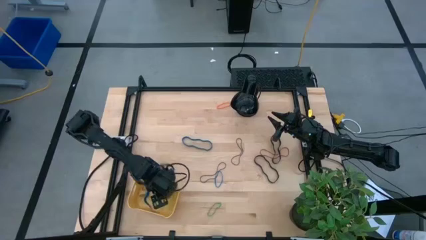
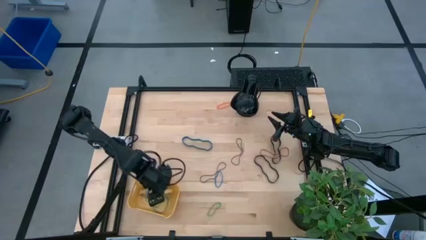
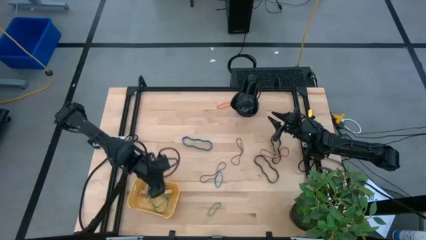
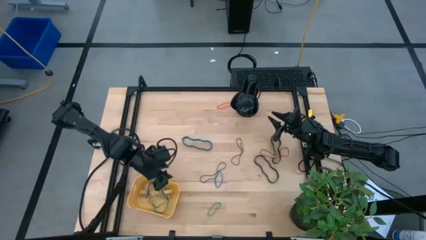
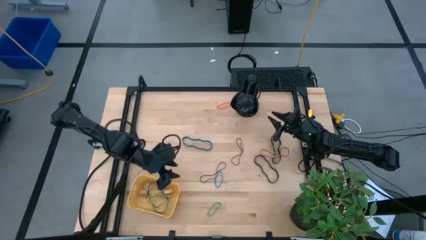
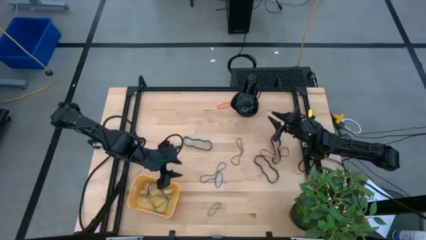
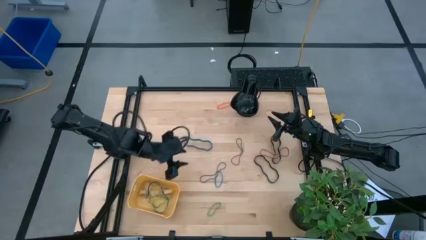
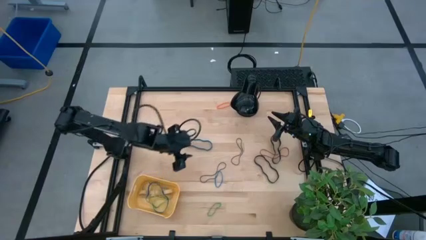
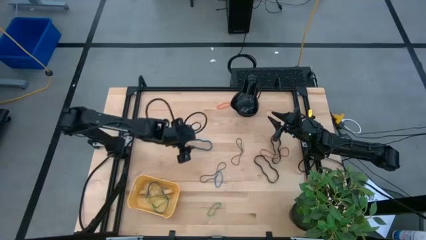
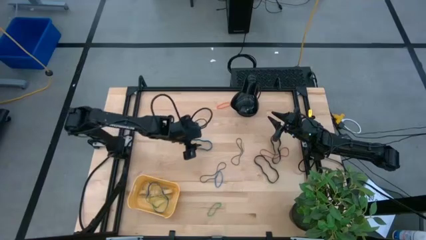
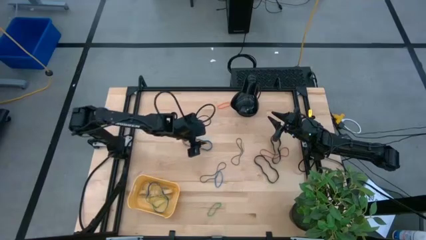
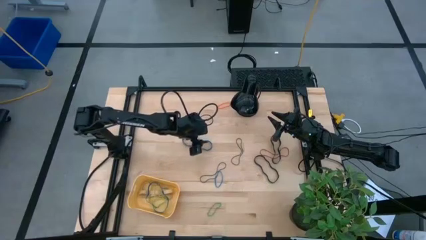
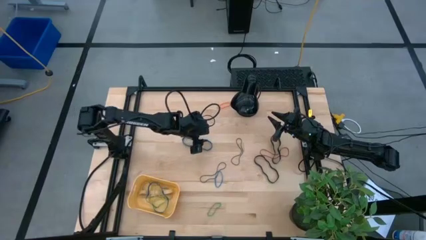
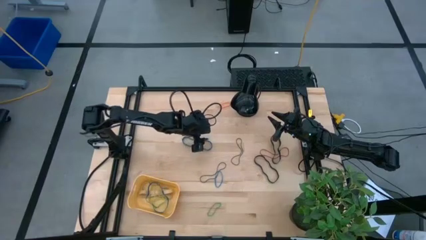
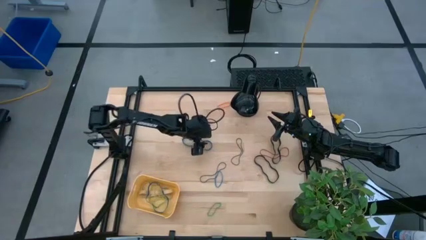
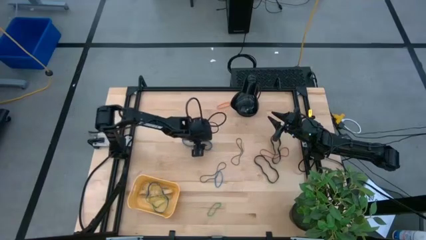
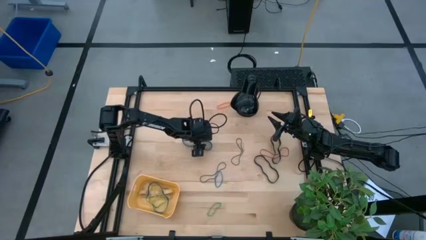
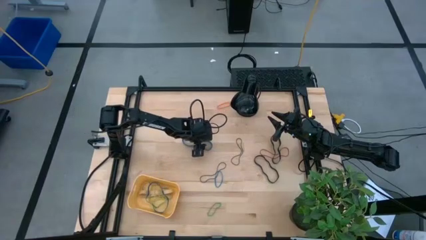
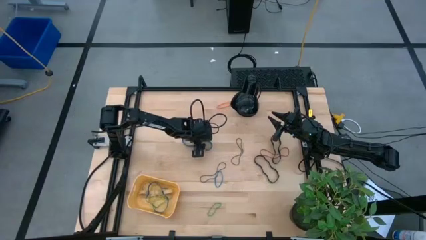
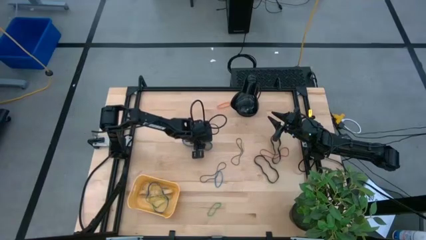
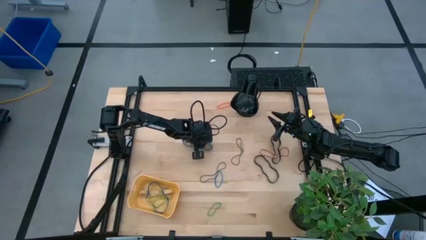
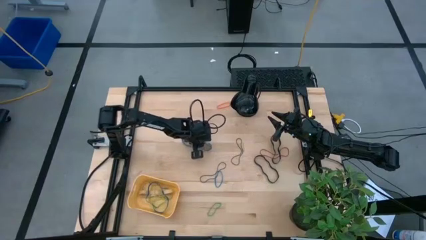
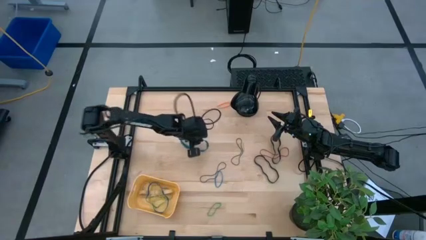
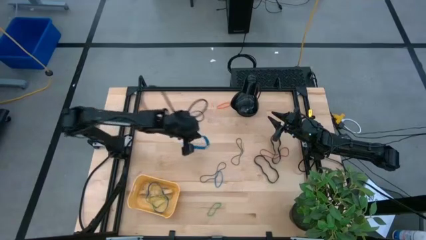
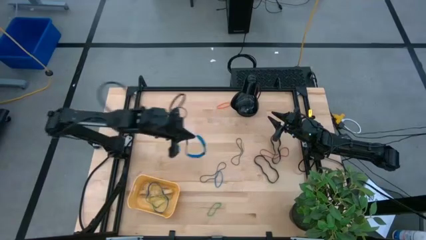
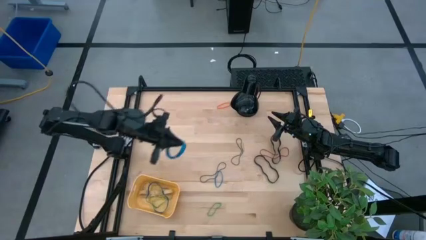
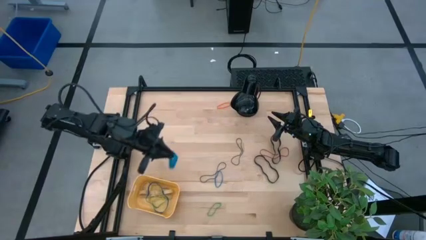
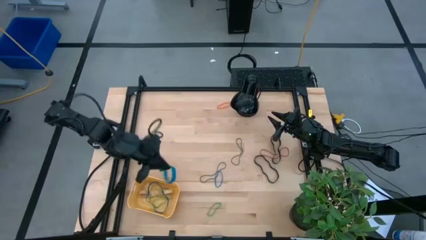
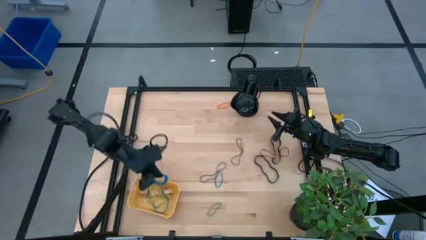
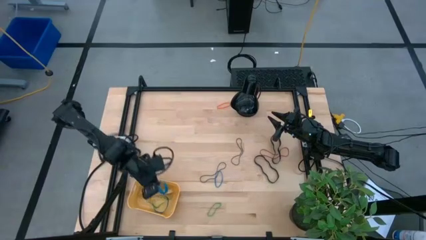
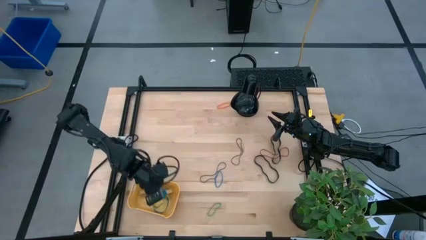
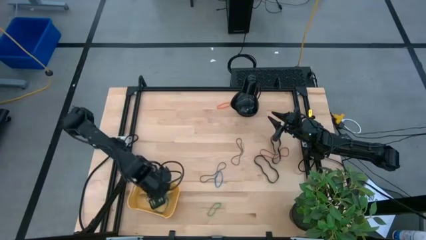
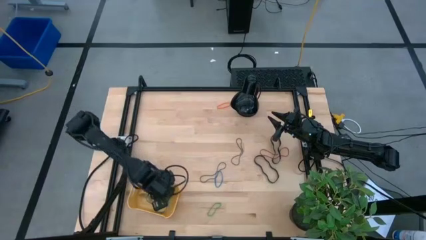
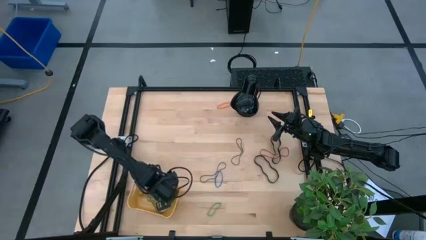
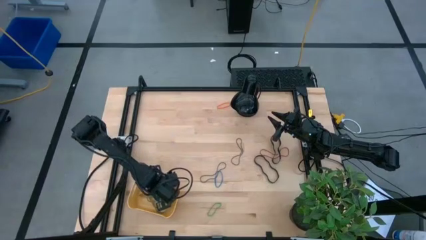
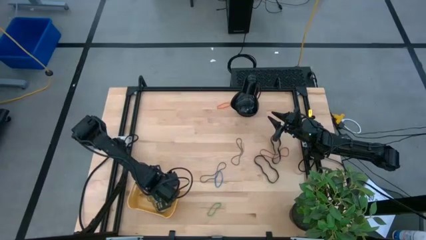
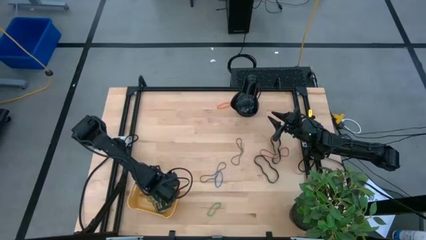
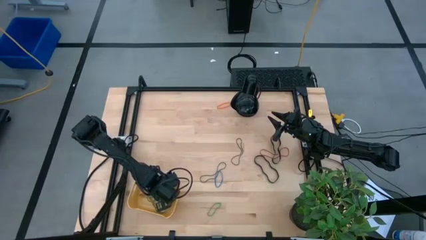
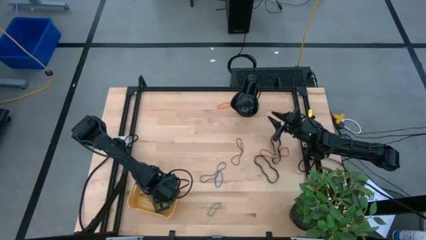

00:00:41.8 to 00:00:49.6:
Task: Pick and place rubber bands into bin
Put the blue rubberband into the yellow bin

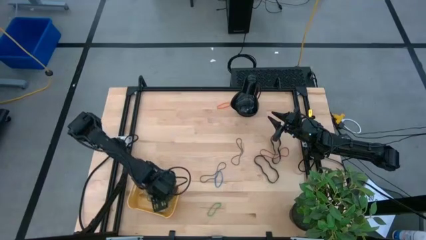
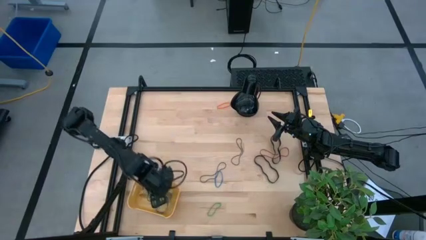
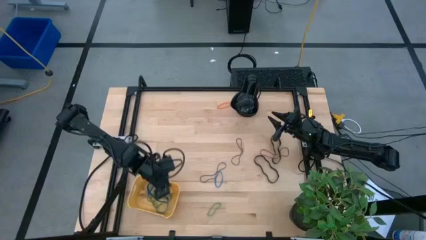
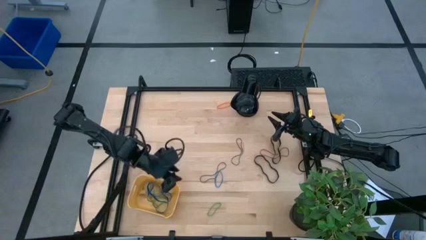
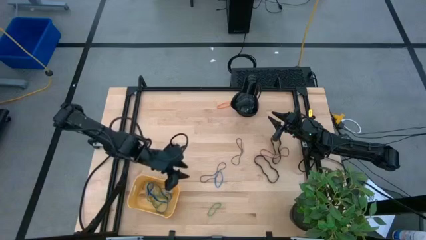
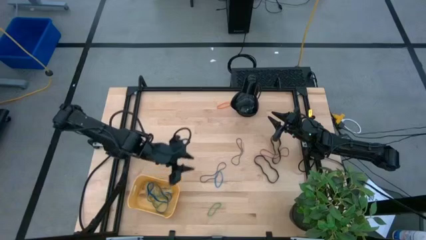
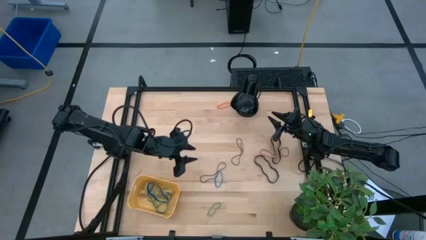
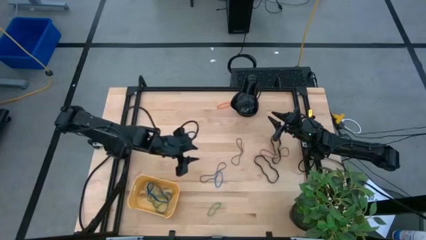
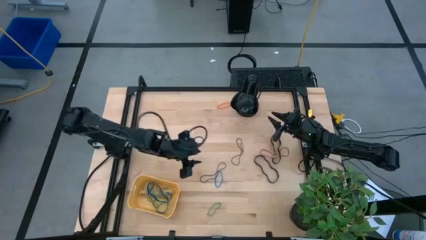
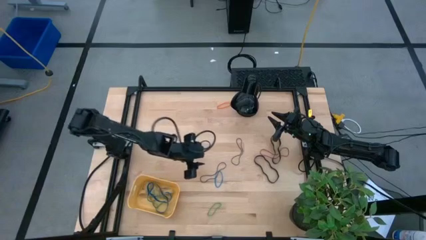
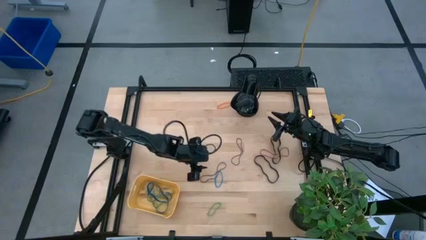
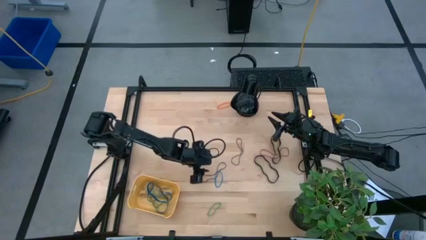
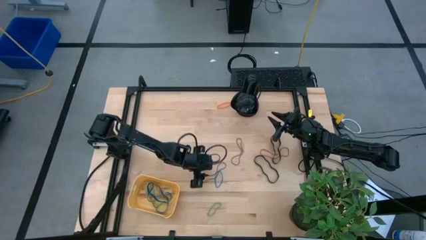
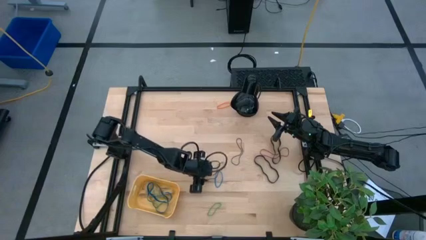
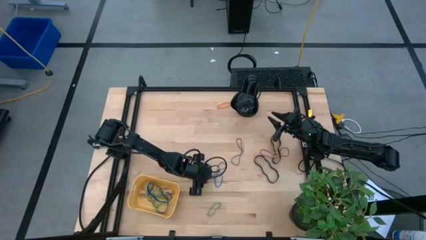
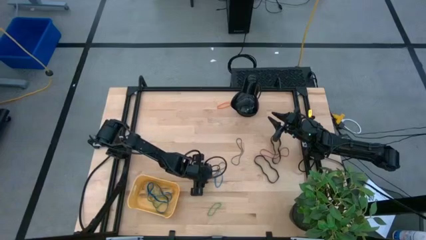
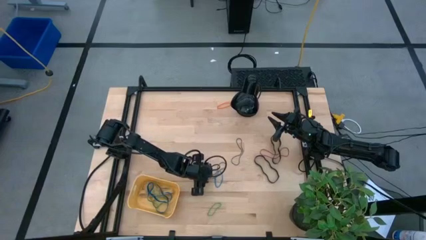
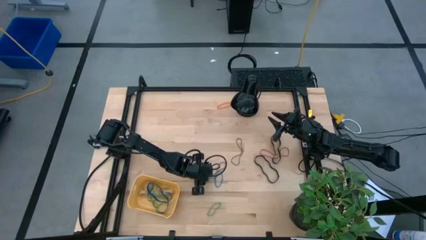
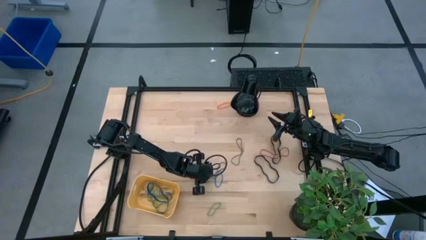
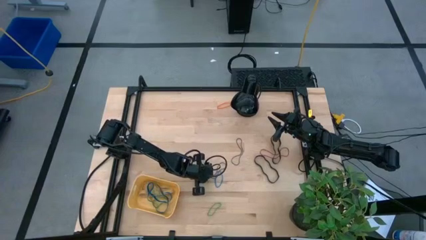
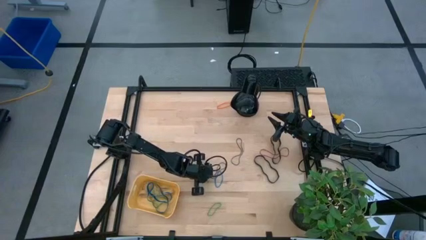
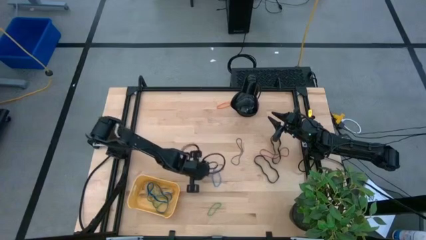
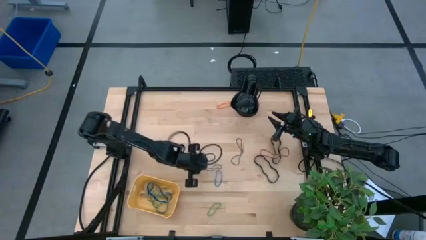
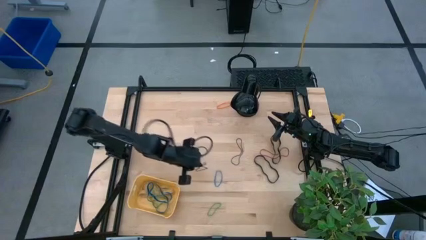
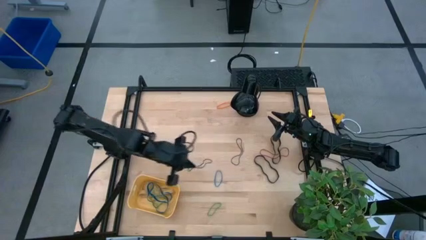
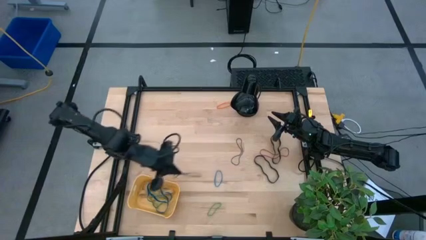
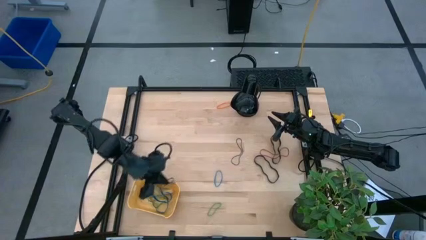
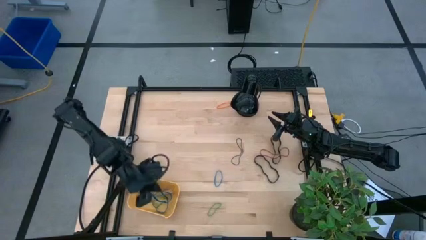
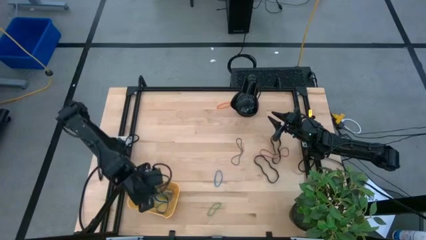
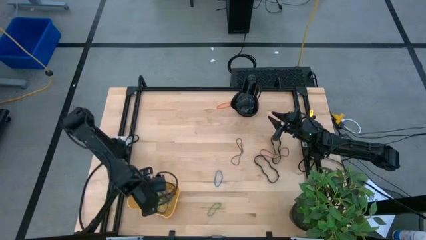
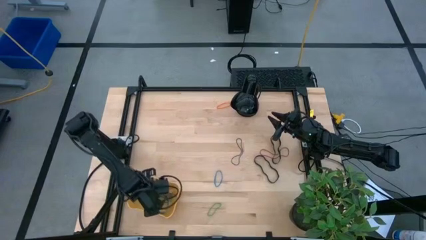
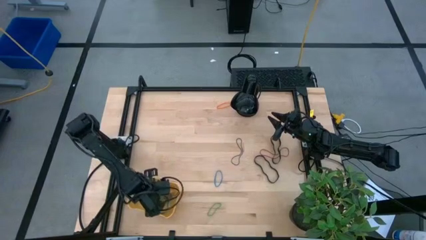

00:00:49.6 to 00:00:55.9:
Put the left purple rubberband into the yellow bin

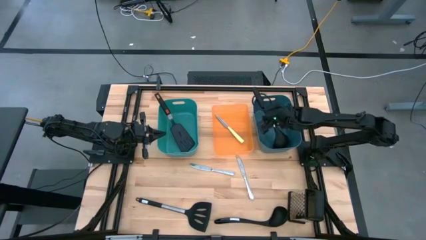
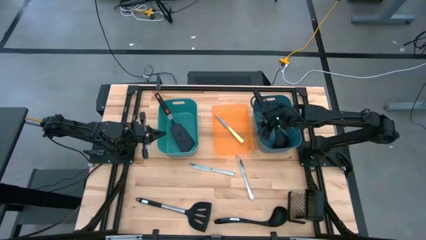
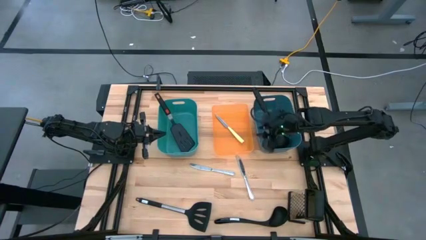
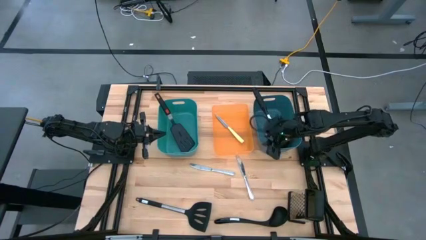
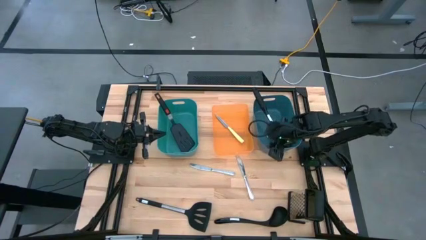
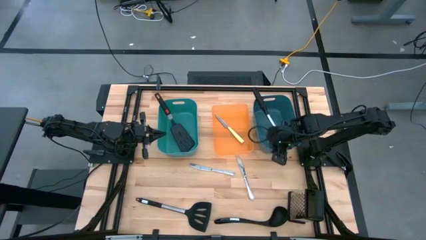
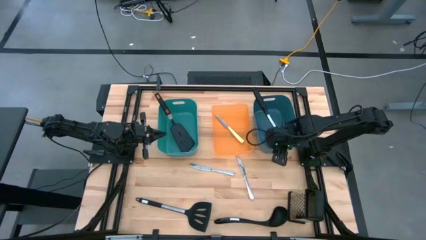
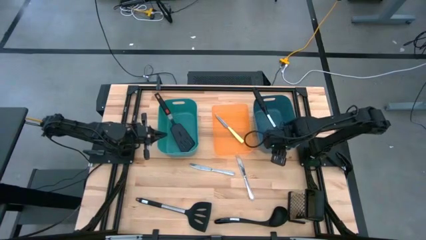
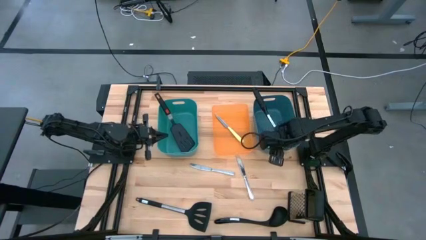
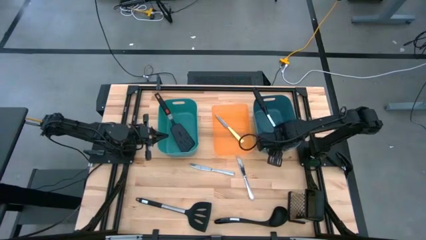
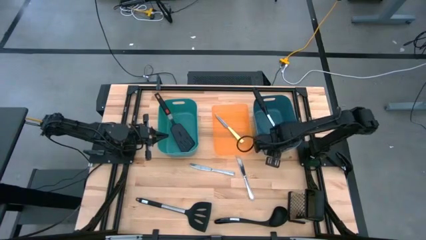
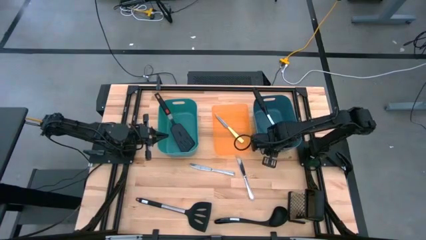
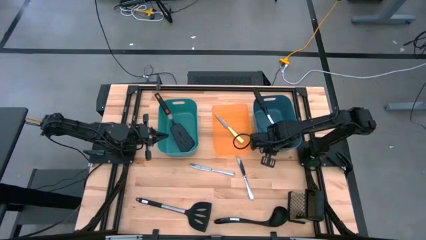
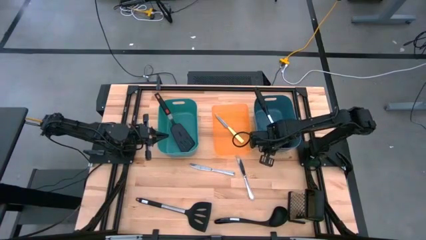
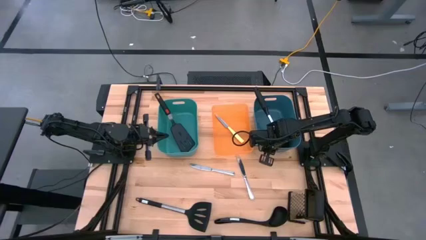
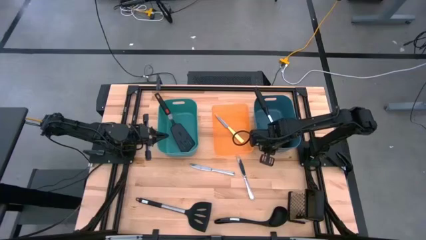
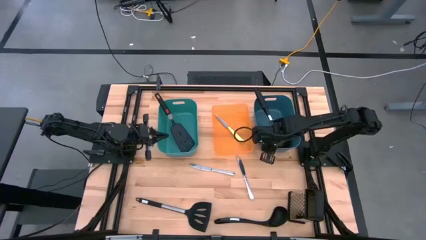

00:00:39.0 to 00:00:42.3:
Task: Pick & Place Kitchen Items
Adjust the blue bin
